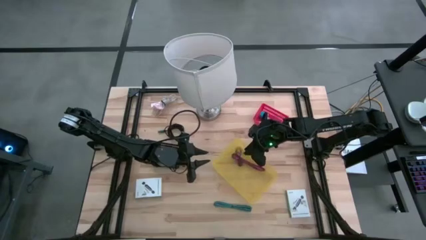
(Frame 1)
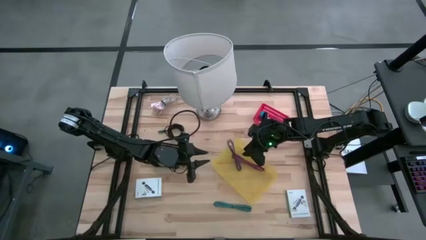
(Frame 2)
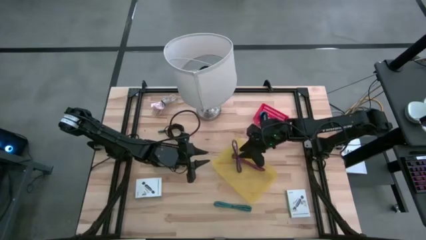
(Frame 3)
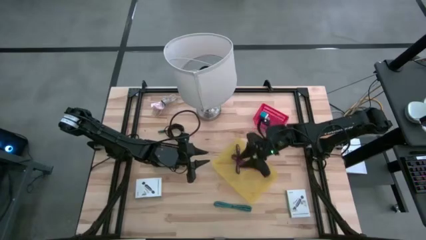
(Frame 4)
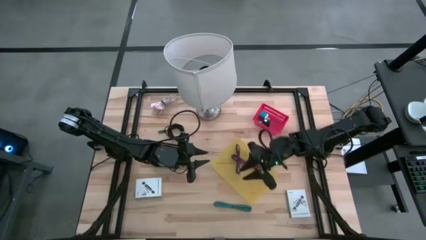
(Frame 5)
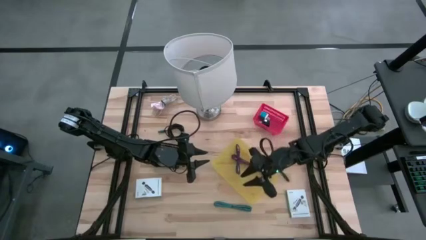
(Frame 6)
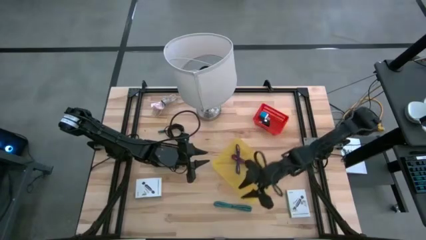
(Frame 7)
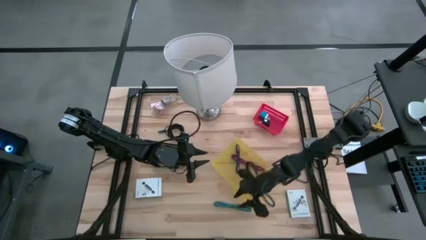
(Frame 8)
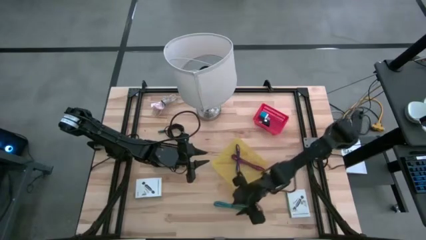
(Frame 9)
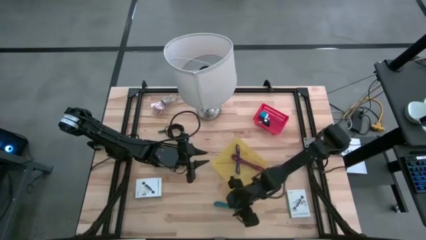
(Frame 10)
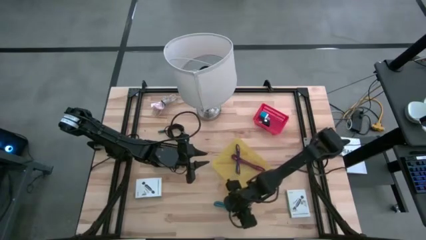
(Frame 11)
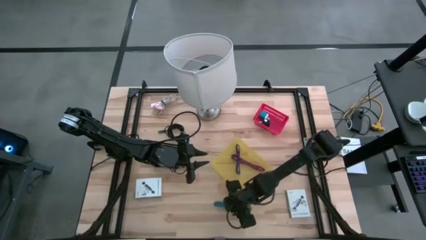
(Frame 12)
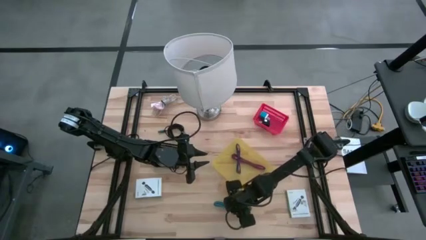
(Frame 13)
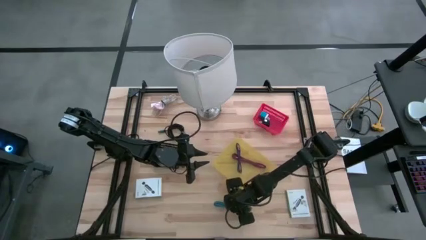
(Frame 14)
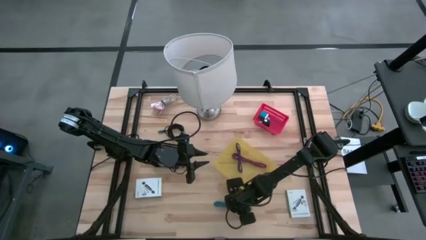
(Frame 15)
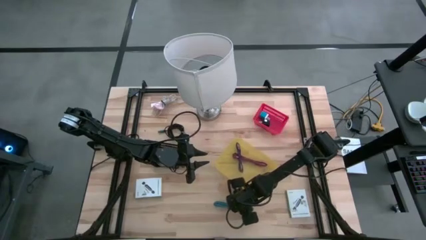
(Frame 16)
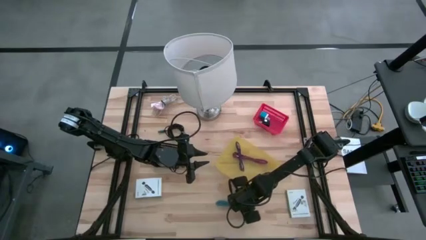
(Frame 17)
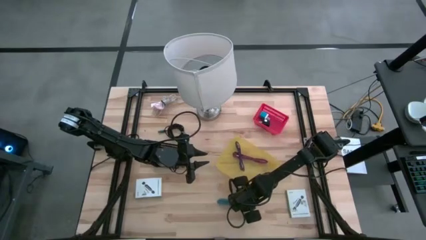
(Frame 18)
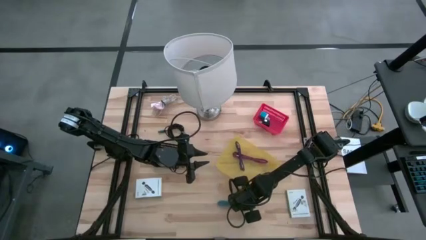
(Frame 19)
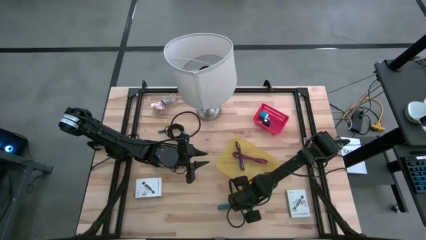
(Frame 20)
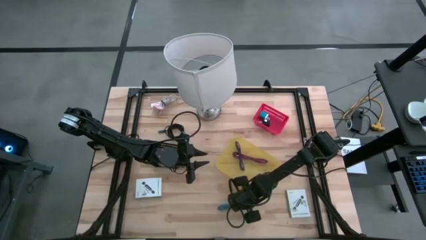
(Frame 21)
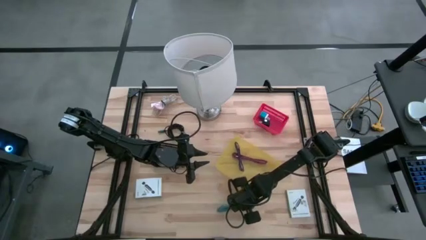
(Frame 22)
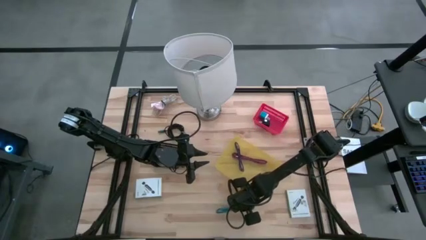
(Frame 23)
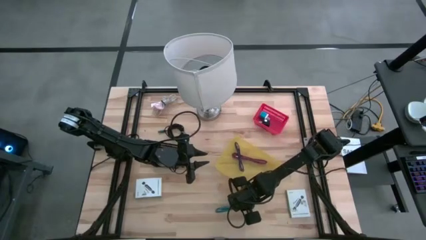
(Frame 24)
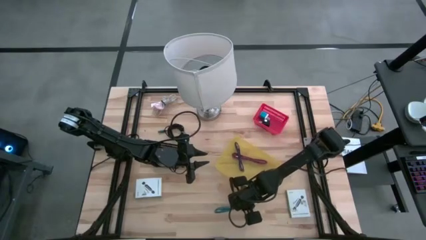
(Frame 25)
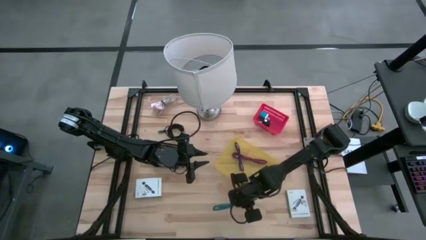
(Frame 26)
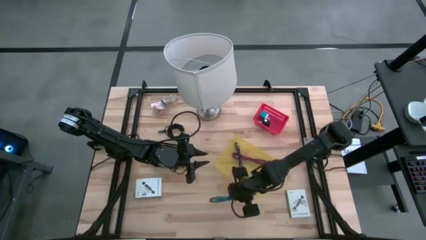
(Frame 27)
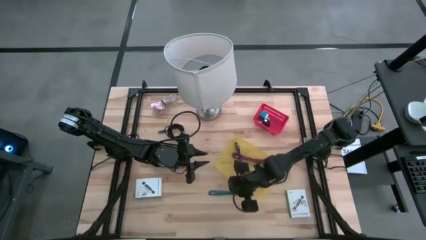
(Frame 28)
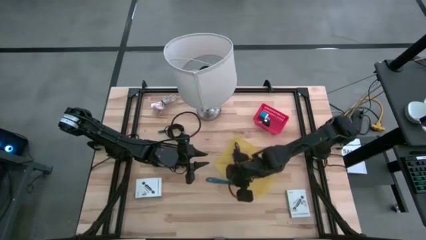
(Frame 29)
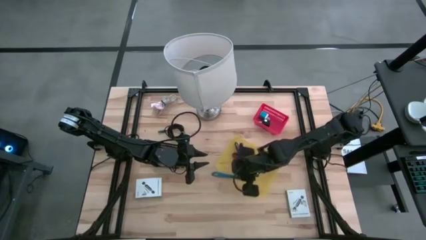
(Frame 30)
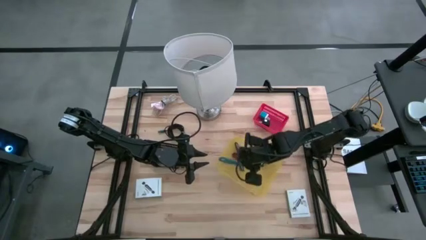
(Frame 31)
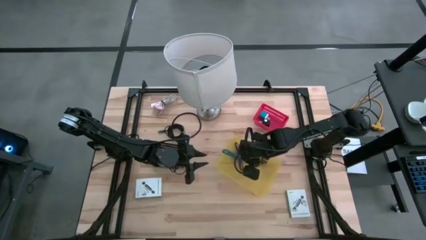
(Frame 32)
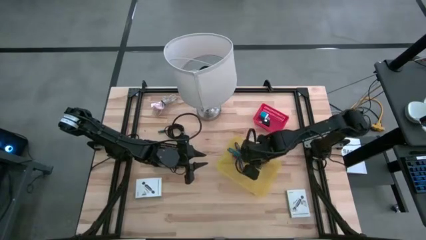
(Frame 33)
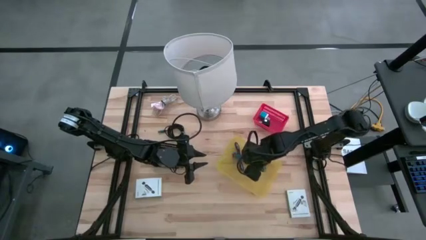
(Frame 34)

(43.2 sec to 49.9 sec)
Task: Pick and place items into bin
Put the light blue charger cable into the yellow bin

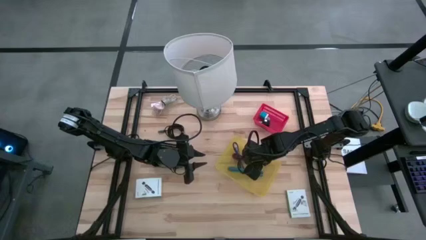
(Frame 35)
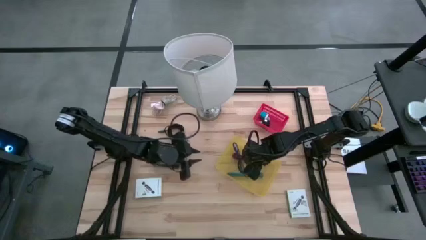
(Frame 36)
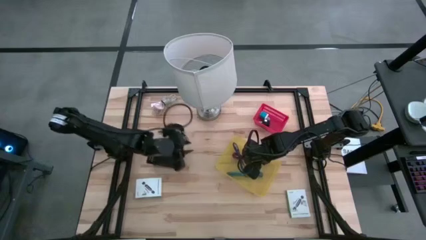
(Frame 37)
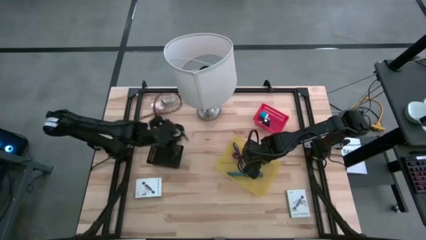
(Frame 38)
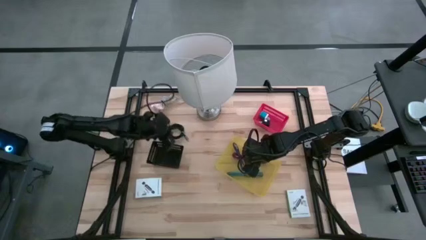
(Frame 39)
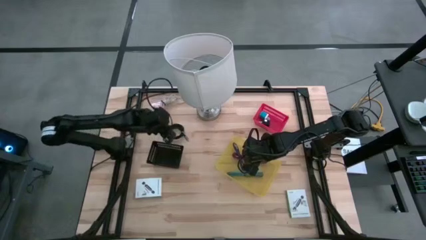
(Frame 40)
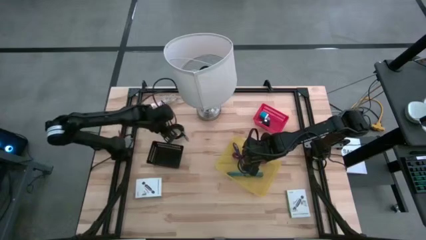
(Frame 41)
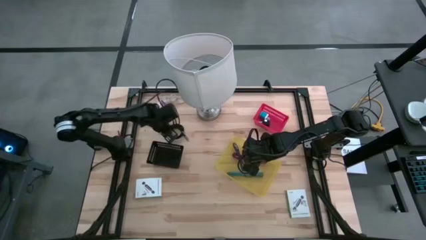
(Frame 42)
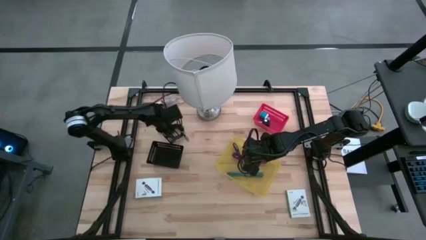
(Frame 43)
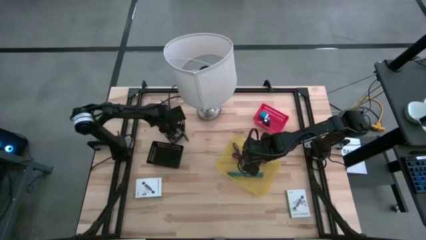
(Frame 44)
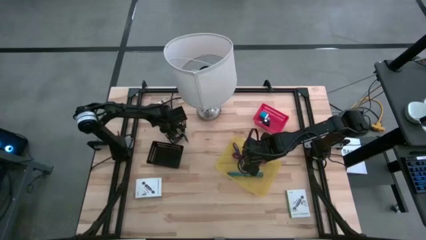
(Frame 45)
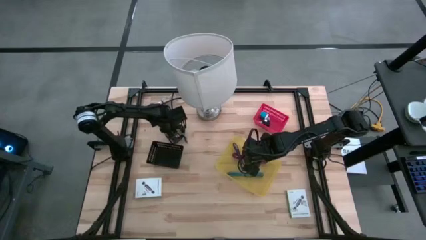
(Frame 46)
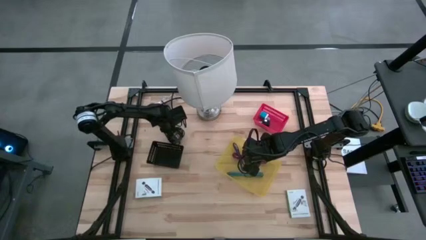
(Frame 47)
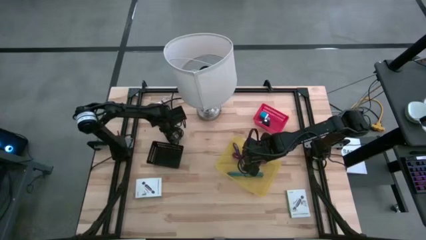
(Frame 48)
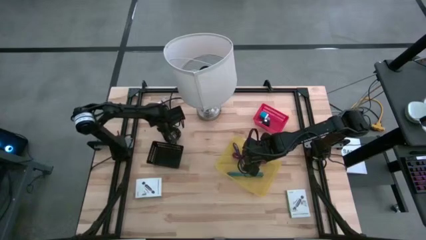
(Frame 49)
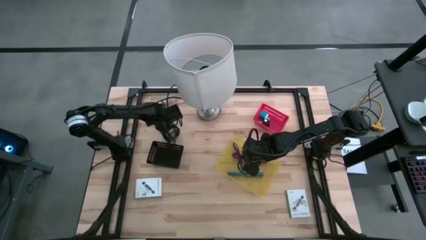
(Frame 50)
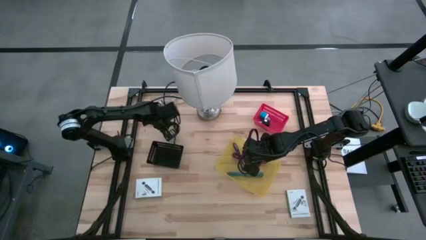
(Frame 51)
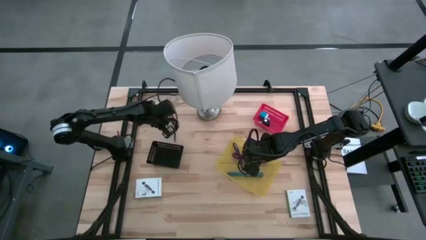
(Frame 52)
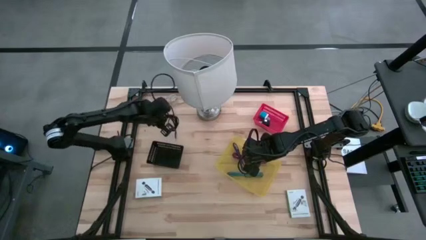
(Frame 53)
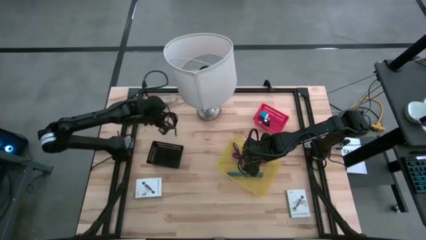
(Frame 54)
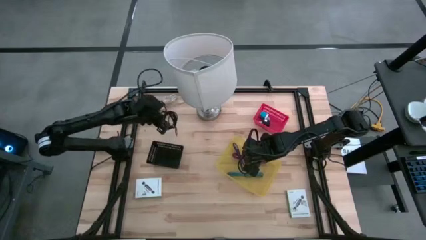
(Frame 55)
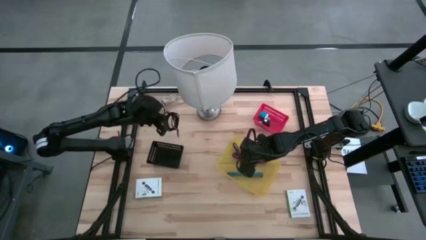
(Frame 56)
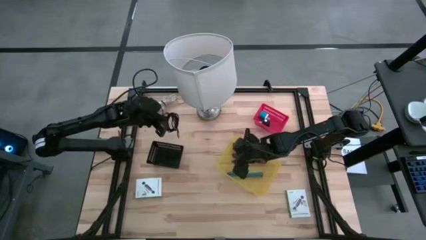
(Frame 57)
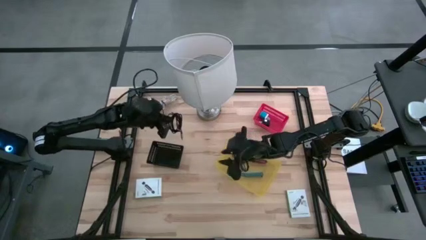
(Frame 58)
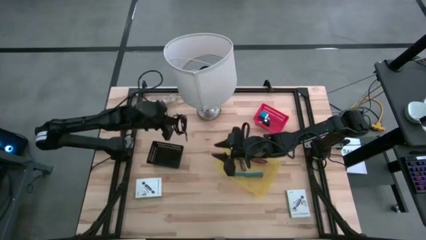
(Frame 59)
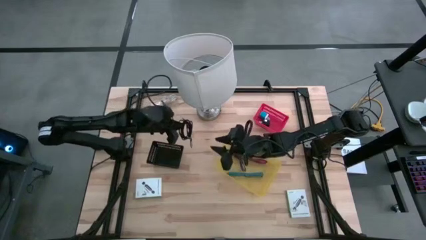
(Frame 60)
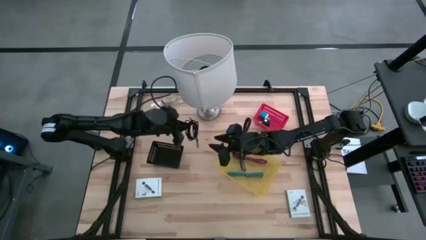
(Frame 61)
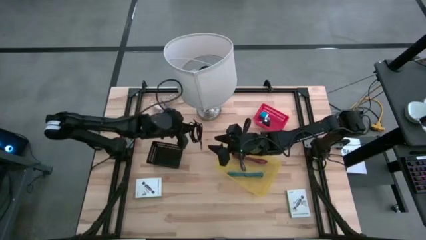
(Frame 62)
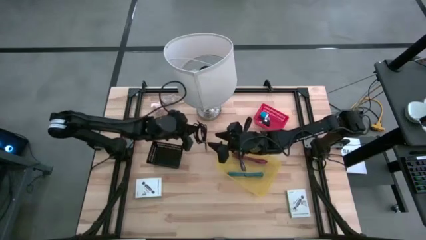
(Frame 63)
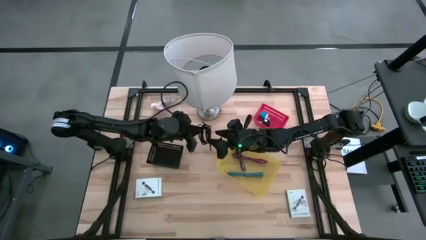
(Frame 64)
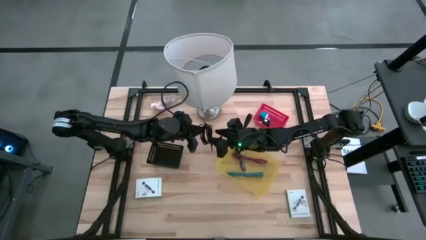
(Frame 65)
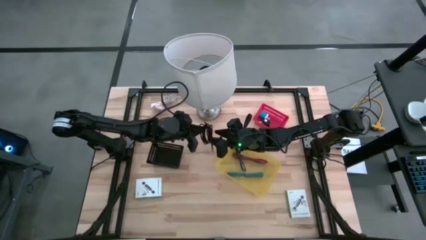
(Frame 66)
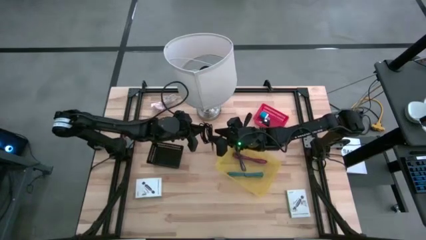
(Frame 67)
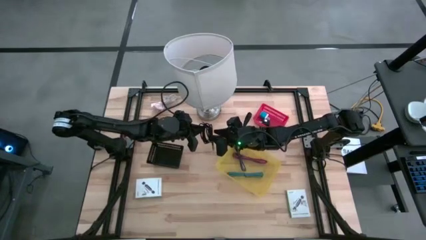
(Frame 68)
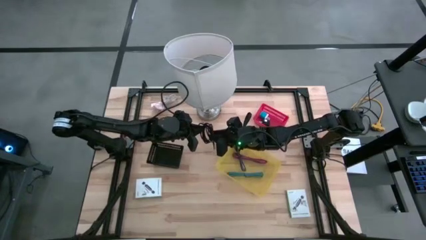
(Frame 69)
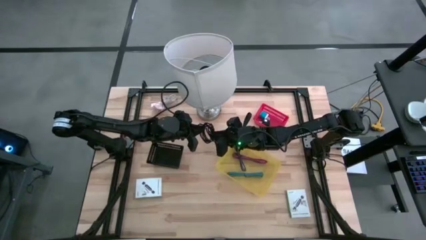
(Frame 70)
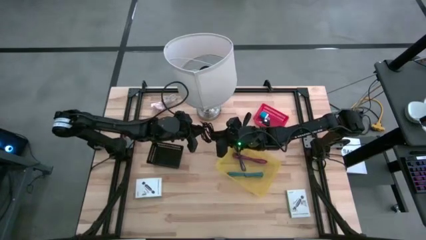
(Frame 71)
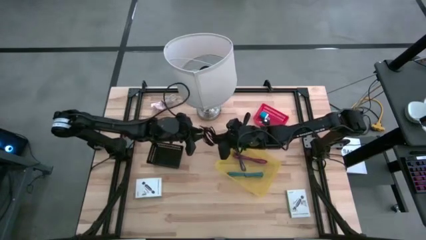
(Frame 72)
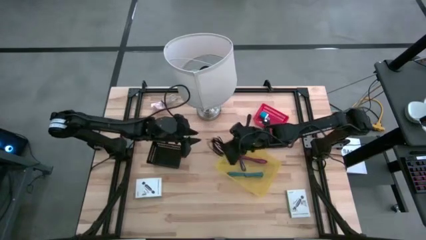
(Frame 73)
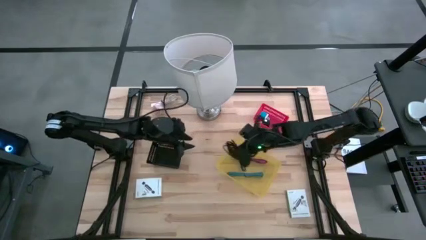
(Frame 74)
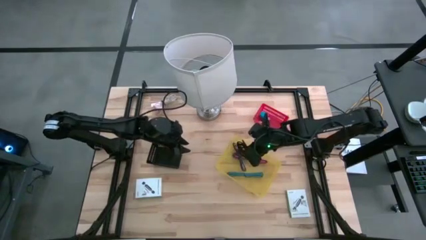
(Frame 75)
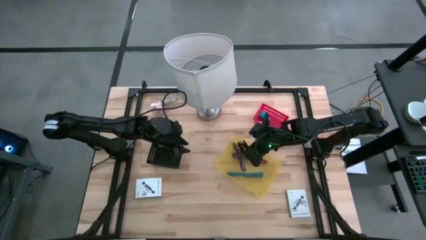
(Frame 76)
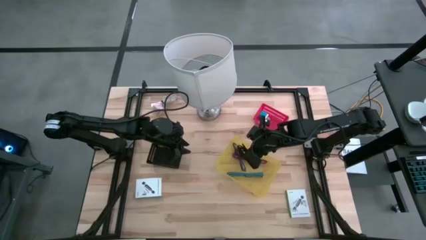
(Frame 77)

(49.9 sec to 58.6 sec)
Put the black charger cable into the yellow bin
